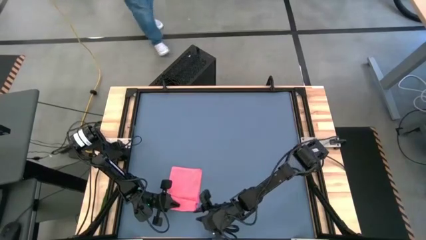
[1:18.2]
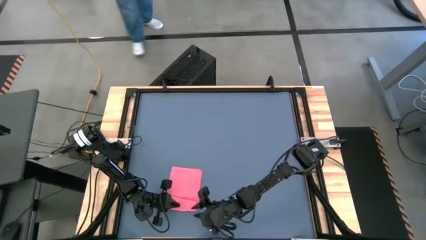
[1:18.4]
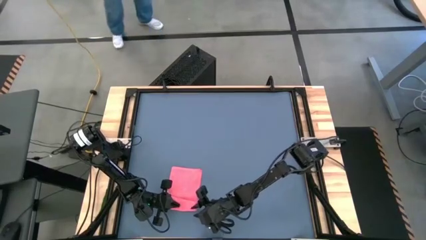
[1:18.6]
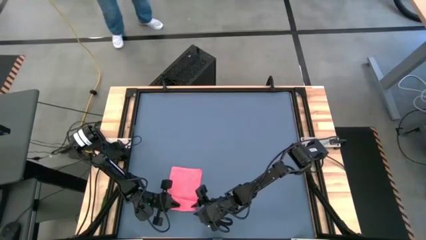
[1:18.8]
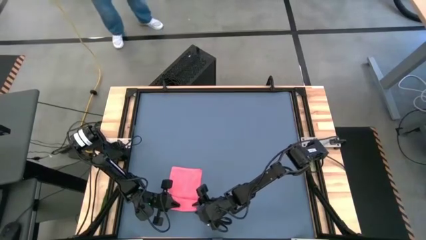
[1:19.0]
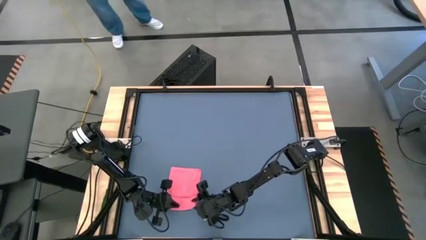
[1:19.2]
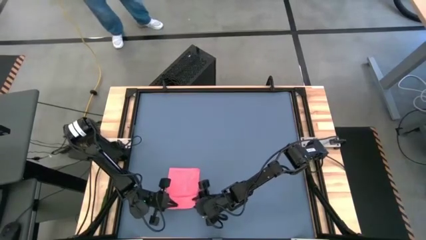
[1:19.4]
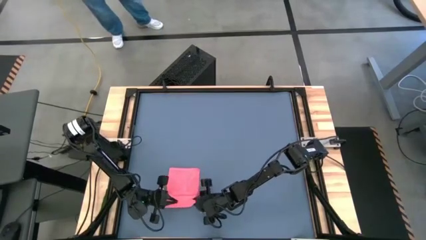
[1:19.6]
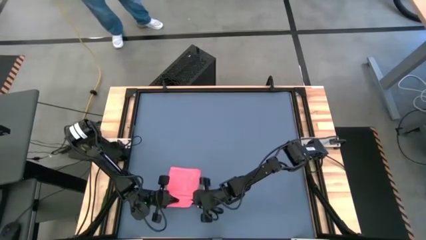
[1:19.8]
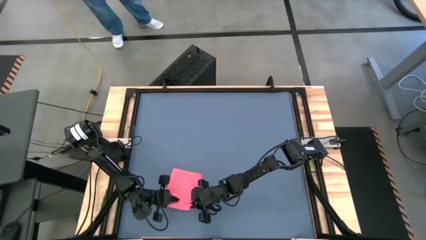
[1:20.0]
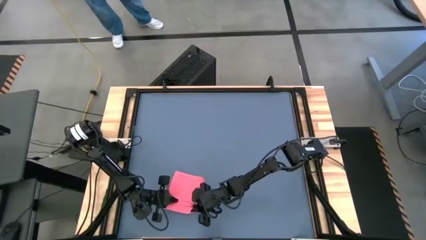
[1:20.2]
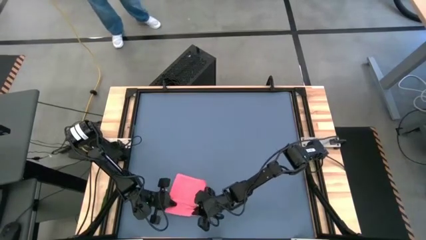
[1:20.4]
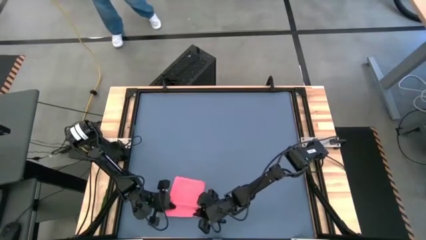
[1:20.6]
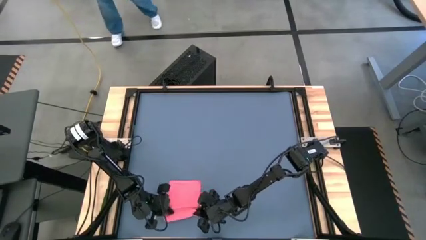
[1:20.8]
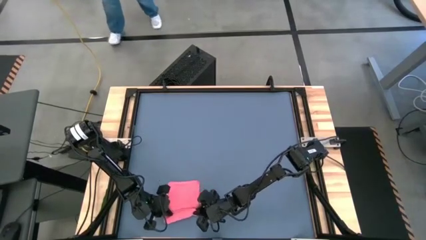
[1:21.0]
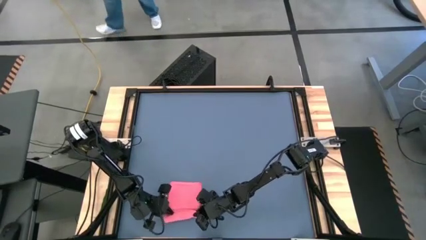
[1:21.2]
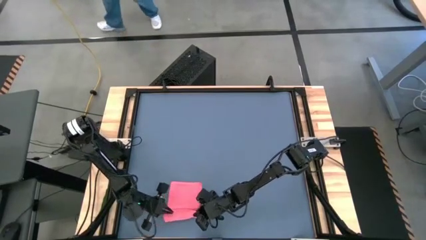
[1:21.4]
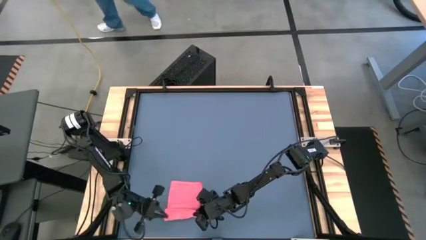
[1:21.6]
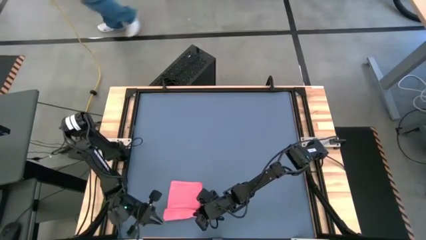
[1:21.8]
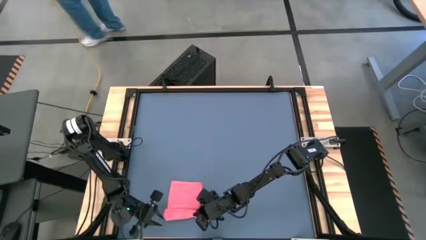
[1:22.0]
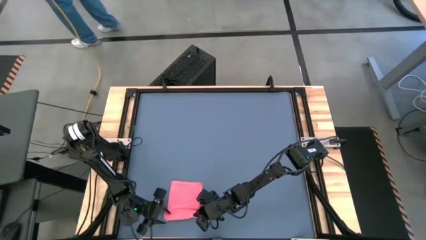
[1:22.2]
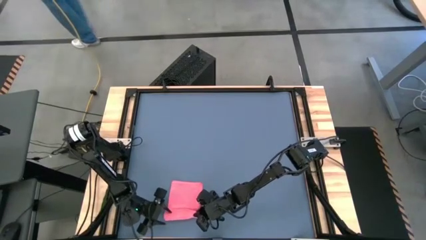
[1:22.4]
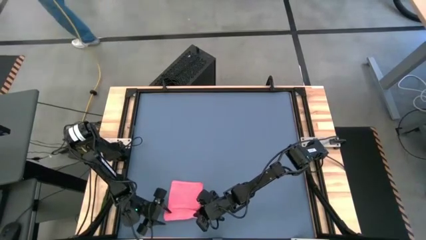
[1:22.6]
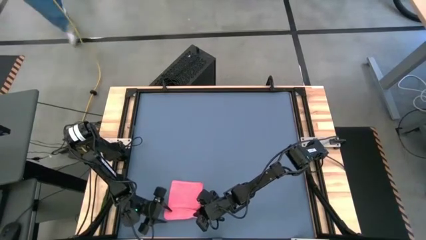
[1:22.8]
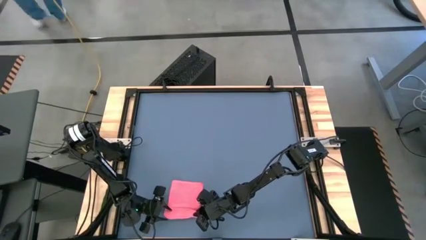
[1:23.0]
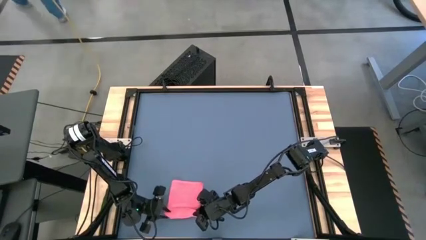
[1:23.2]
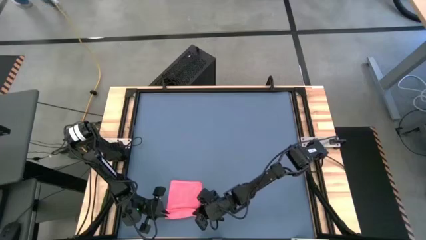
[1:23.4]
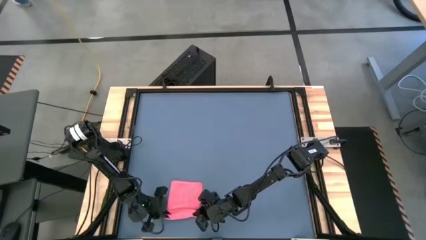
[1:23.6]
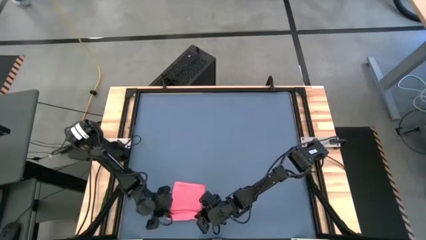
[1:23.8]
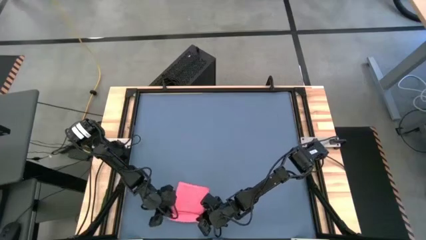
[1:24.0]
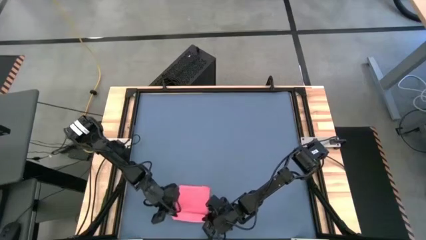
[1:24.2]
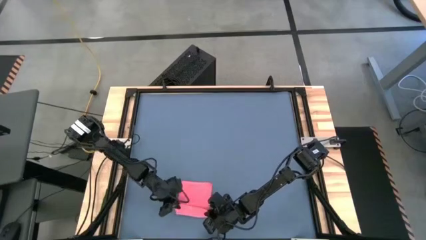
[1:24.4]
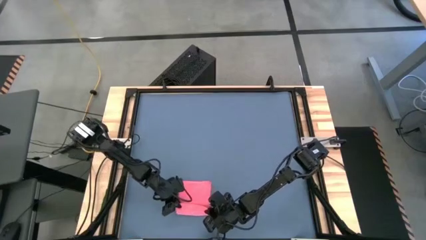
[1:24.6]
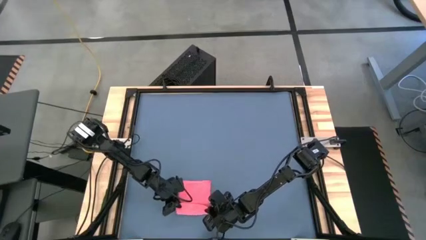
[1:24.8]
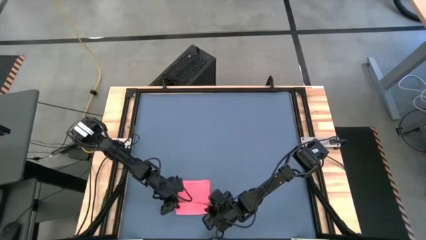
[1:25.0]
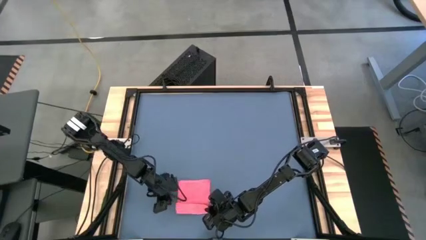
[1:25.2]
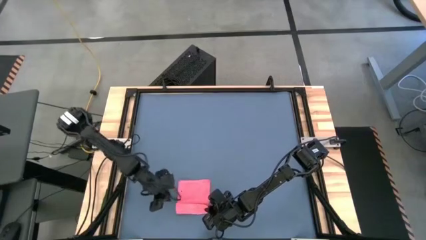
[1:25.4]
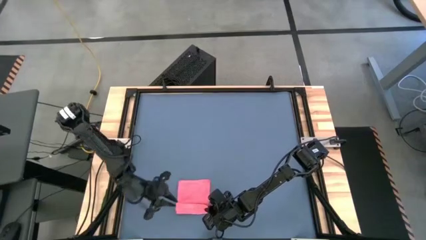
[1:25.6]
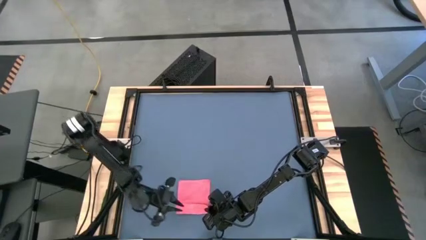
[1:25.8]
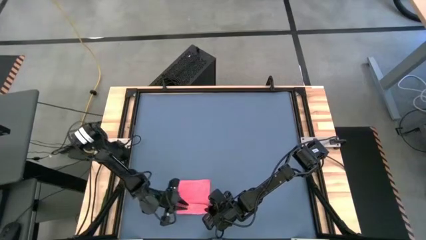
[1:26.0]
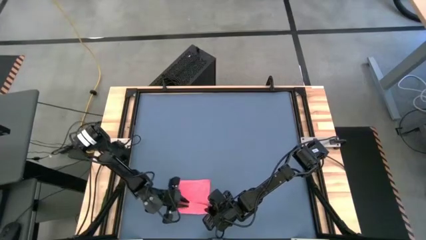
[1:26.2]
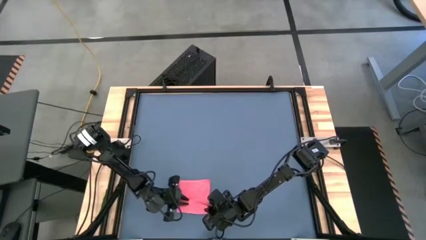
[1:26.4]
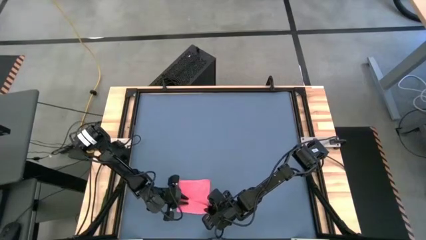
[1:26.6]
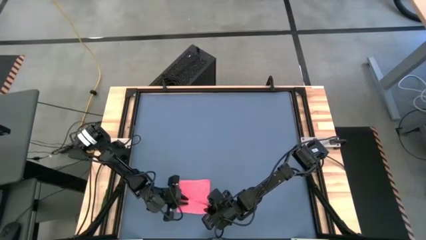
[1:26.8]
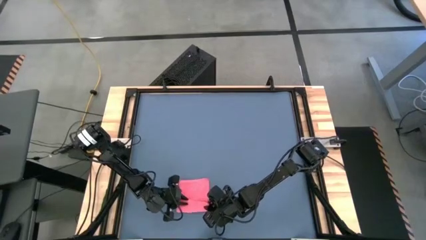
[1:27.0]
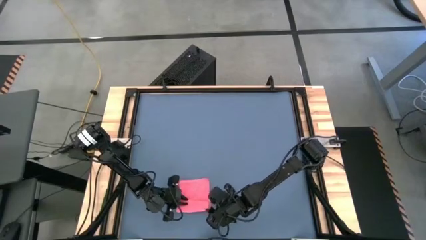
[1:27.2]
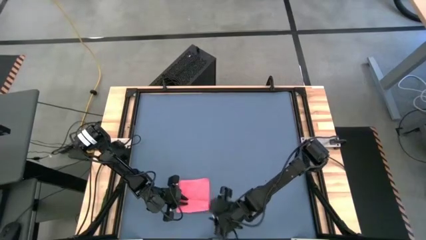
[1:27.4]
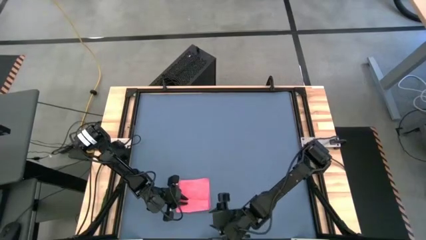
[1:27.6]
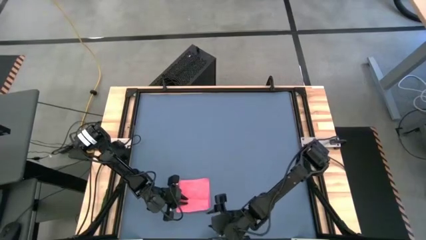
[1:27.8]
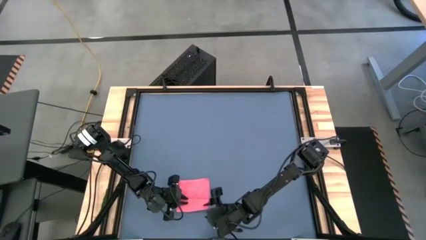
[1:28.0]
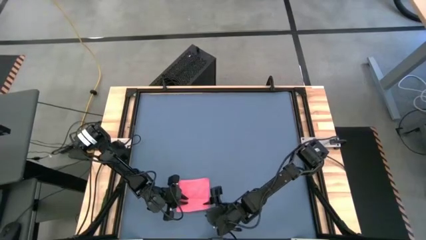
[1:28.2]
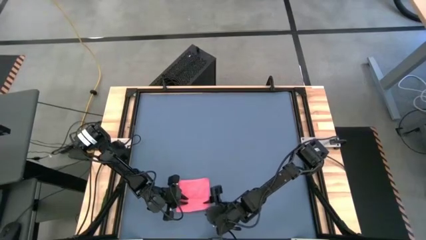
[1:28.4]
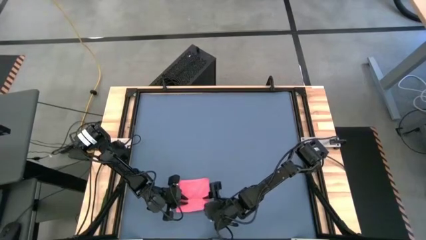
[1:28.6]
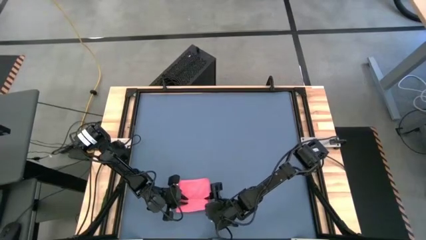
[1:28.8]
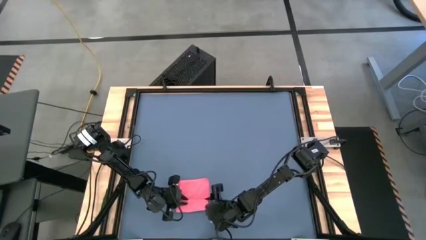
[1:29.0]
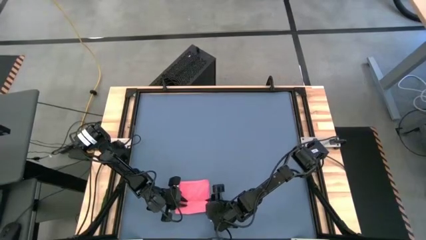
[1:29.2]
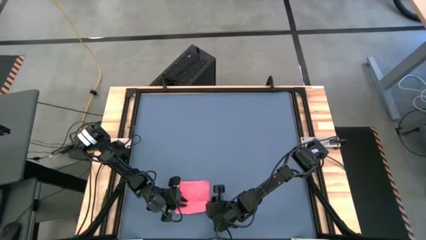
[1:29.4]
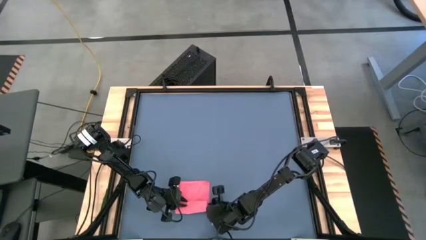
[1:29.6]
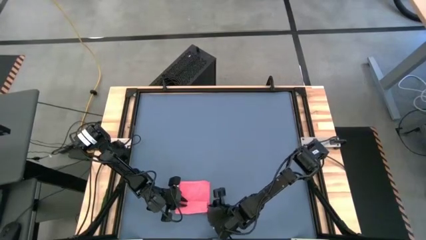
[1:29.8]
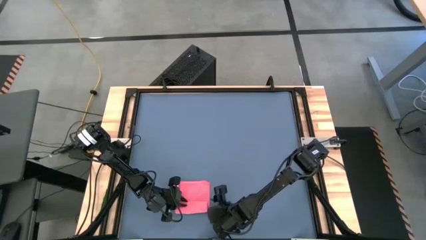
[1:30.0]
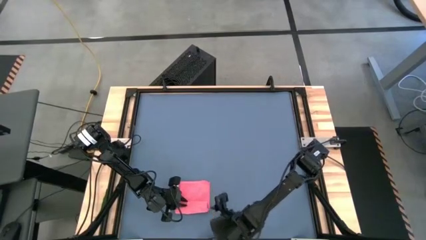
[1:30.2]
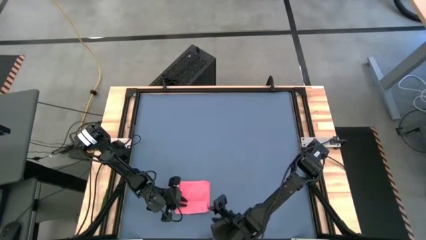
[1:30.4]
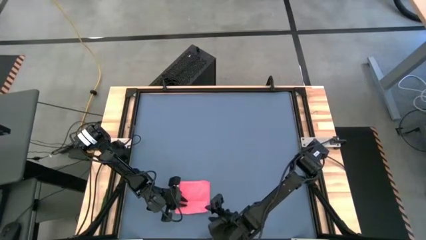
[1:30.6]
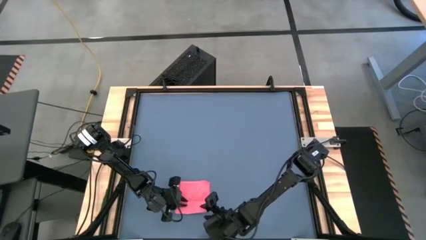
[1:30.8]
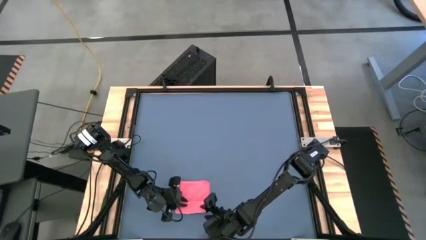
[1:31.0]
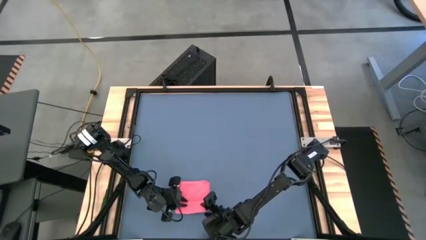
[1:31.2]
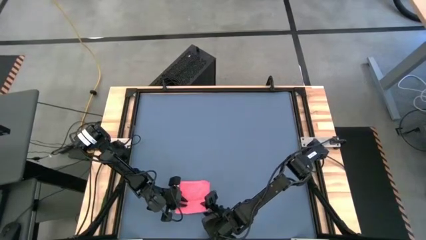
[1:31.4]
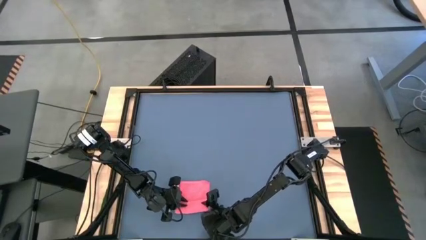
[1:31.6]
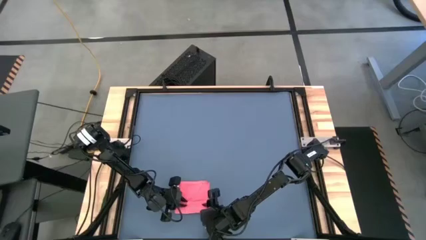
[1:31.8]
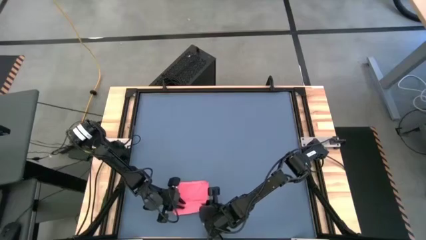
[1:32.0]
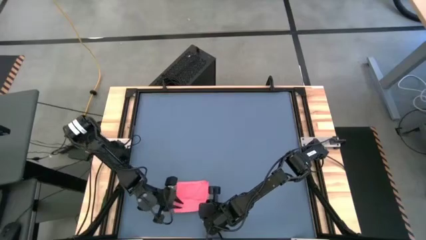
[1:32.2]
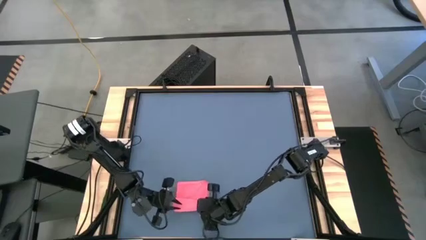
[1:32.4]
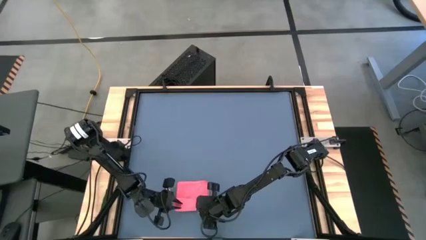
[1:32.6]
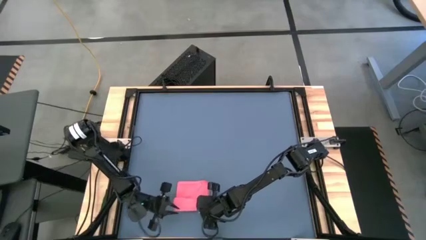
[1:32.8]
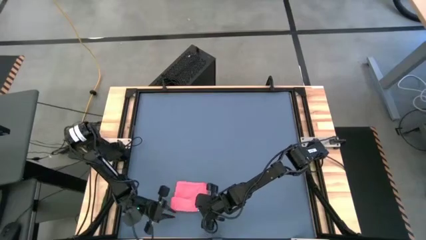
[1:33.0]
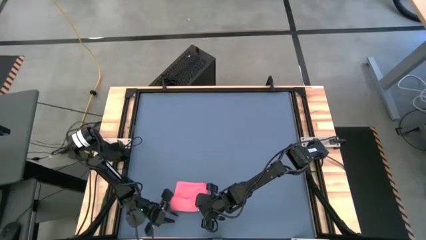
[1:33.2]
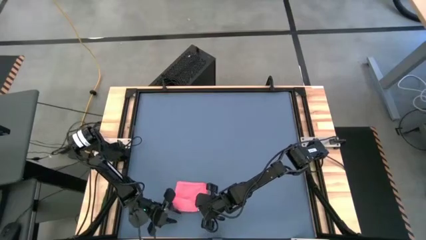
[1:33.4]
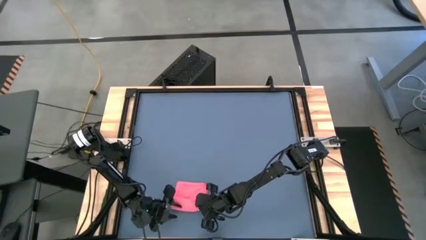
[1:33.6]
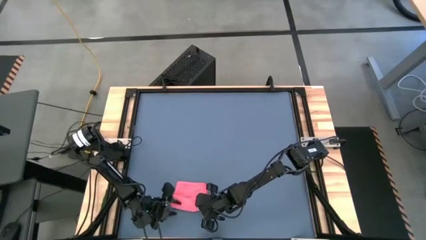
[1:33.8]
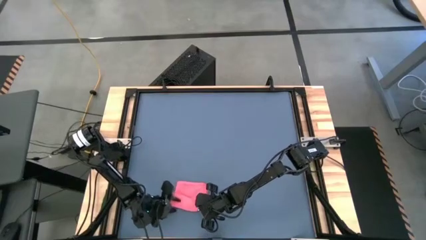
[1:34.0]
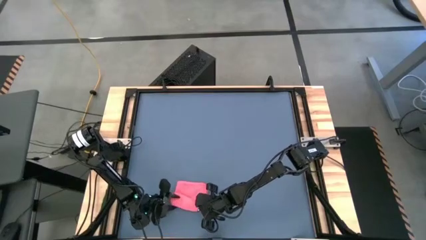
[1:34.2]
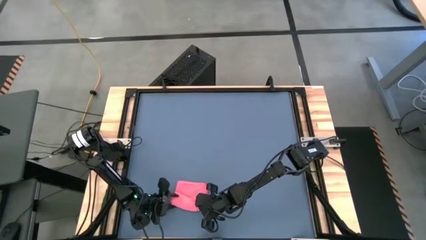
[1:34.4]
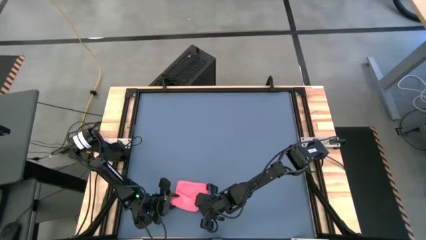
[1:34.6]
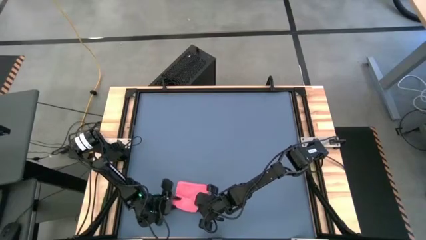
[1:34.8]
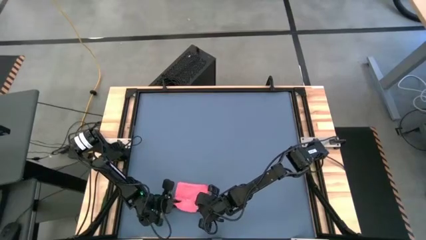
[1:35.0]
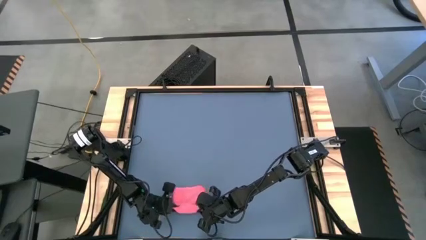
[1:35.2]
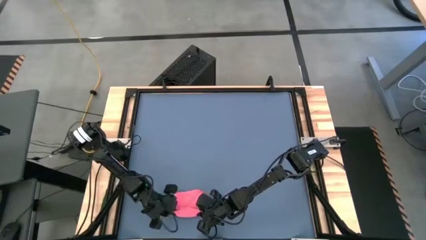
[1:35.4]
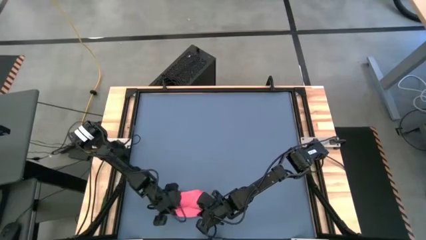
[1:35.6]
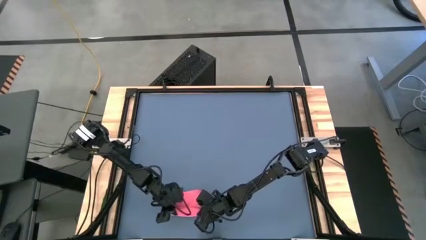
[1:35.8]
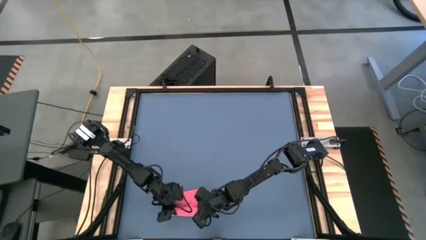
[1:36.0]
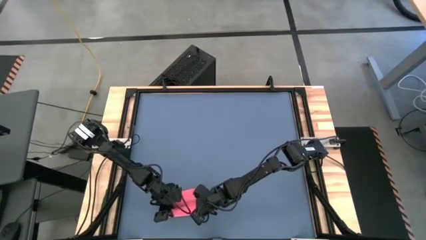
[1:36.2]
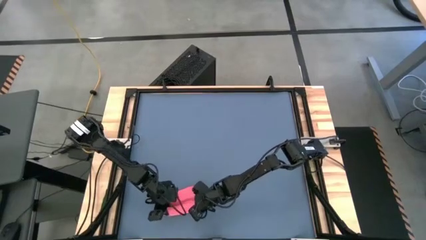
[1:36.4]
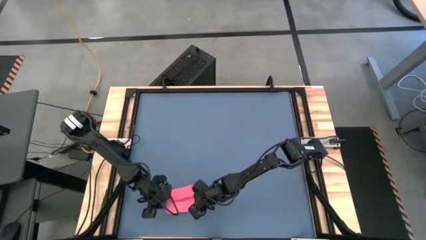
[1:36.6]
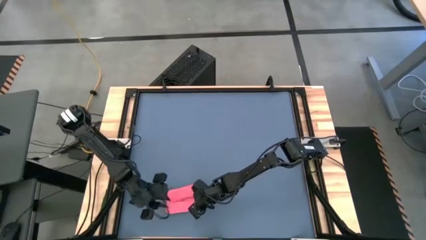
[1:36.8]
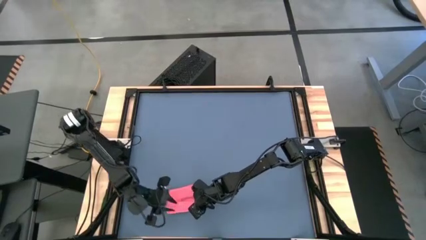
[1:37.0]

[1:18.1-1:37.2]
Task: Roll towel into tight, uniform cylinder
Roll the red towel
